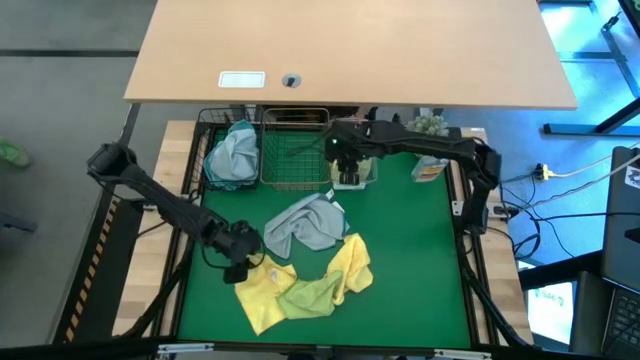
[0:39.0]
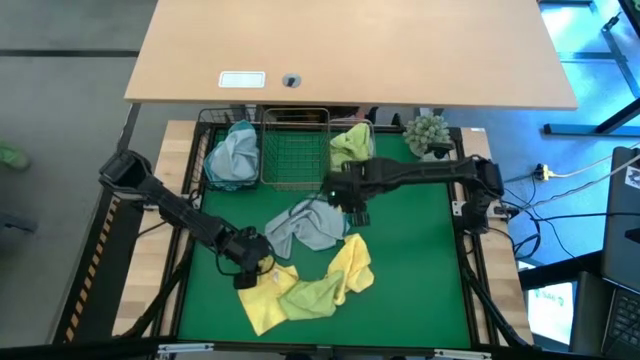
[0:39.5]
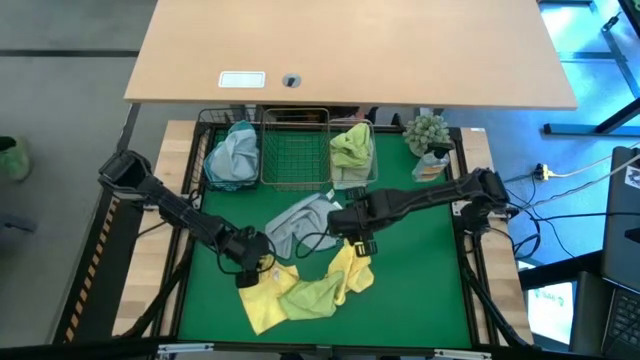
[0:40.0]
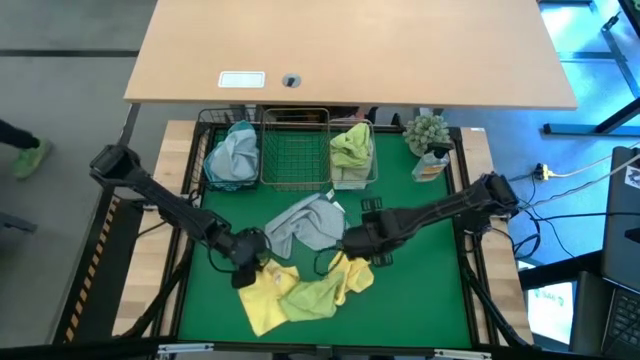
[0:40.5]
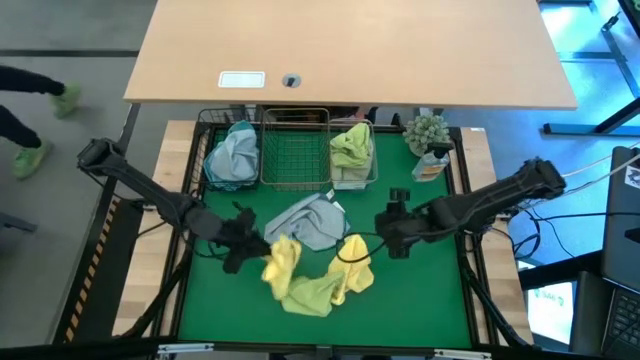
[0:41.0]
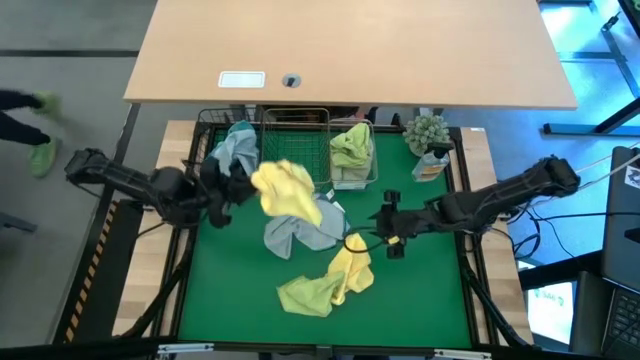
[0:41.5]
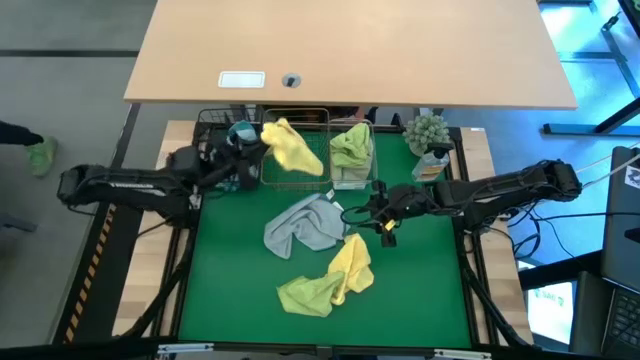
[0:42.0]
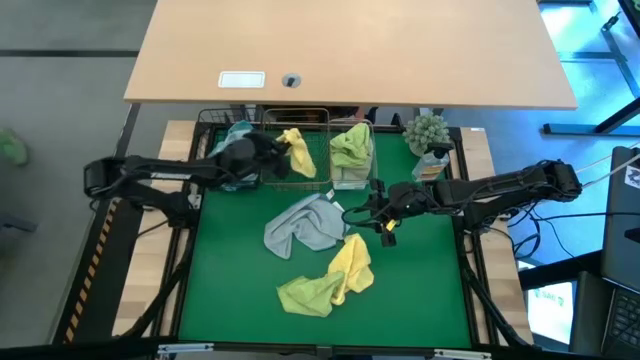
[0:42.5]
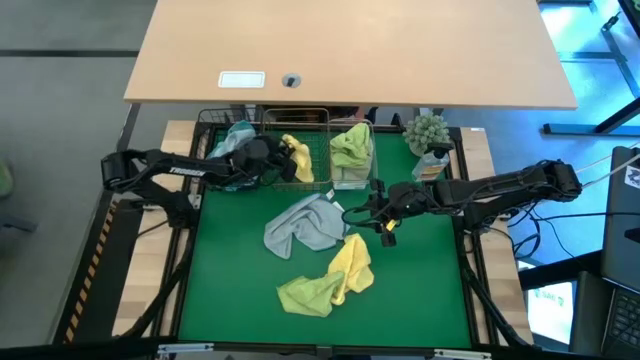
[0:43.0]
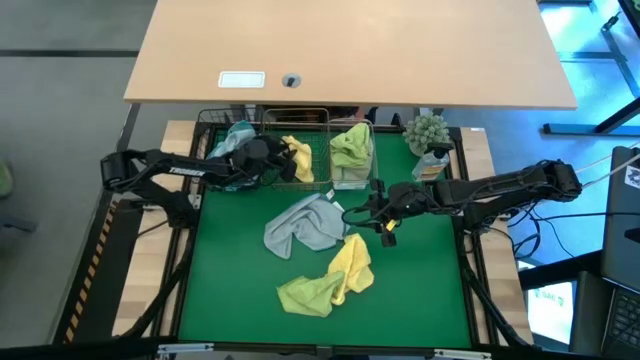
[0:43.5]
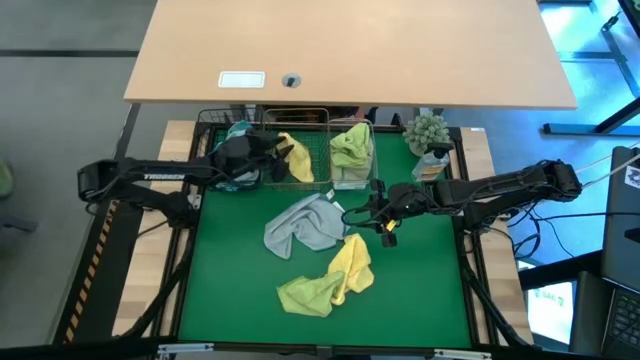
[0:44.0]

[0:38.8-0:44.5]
Task: Sort microfiber towel by color & place in baskets
Put the yellow microfiber cloth into the gold wire basket

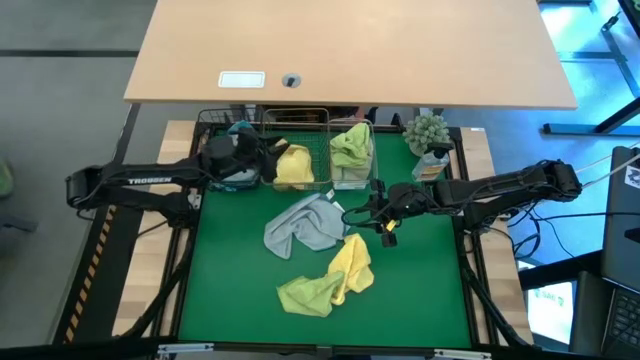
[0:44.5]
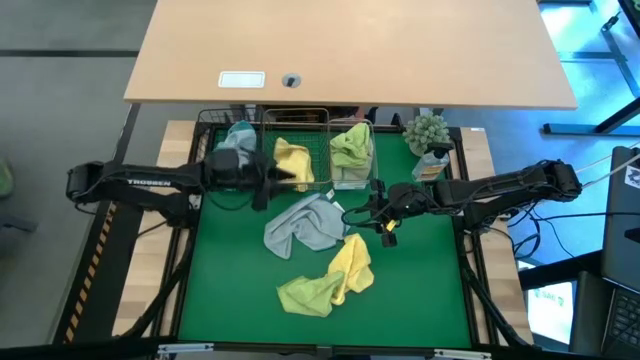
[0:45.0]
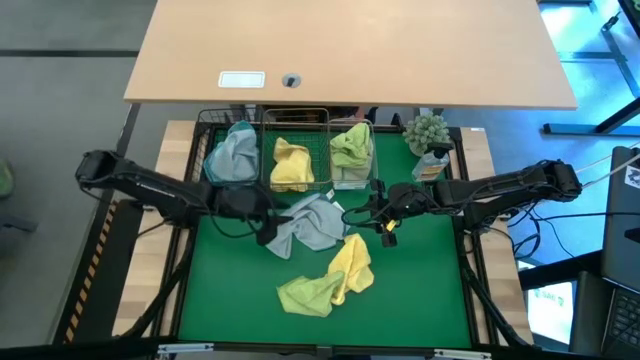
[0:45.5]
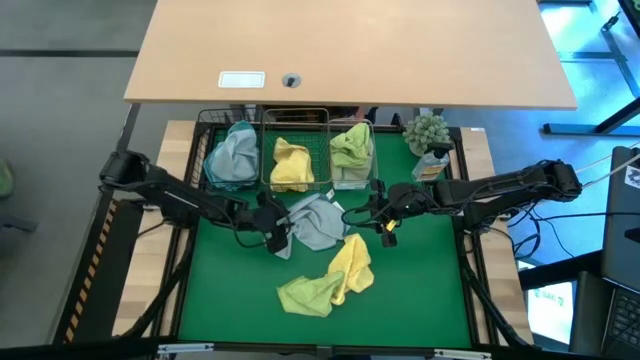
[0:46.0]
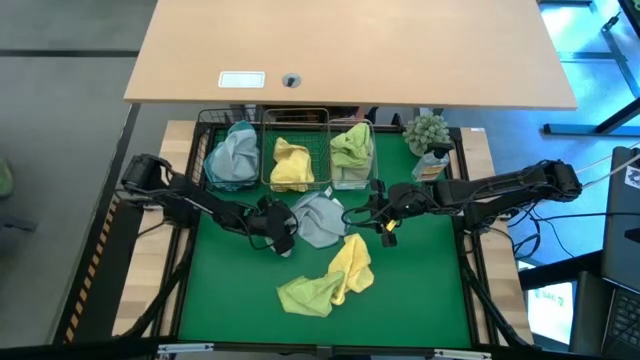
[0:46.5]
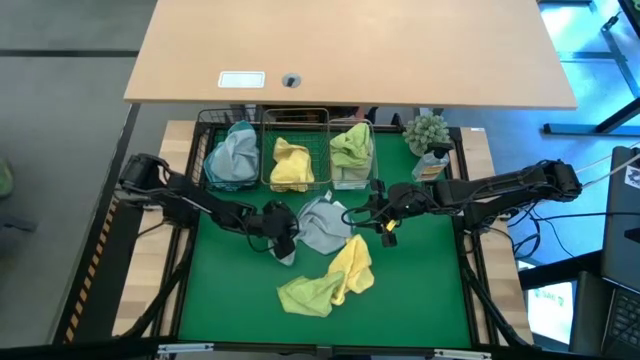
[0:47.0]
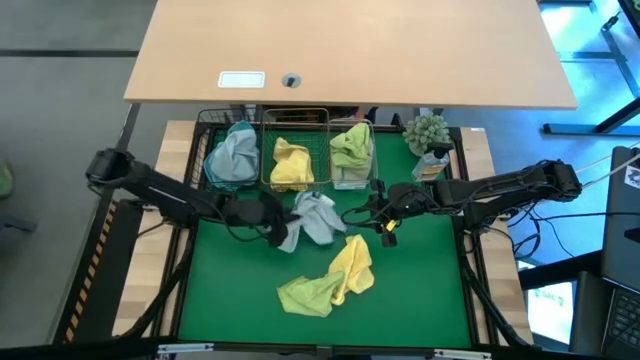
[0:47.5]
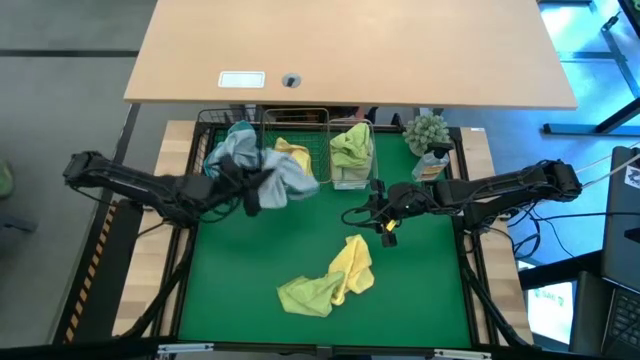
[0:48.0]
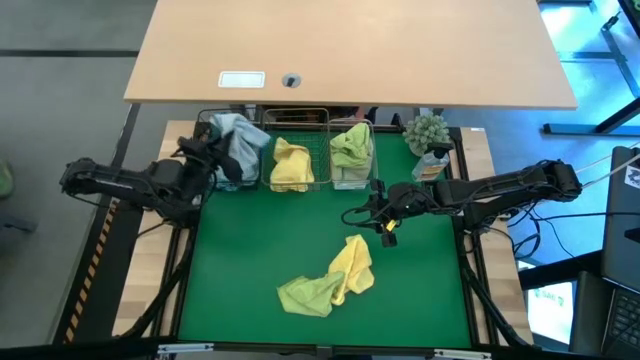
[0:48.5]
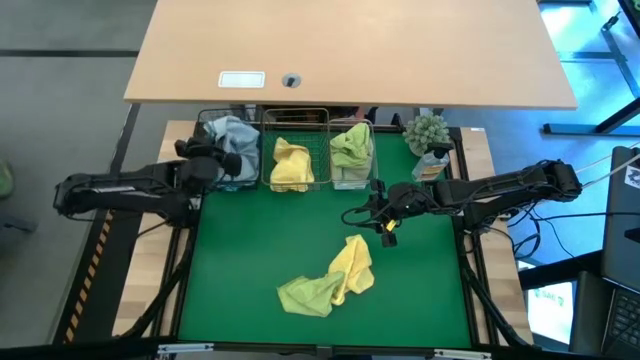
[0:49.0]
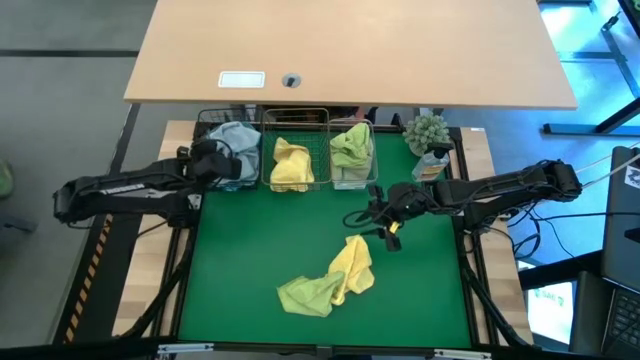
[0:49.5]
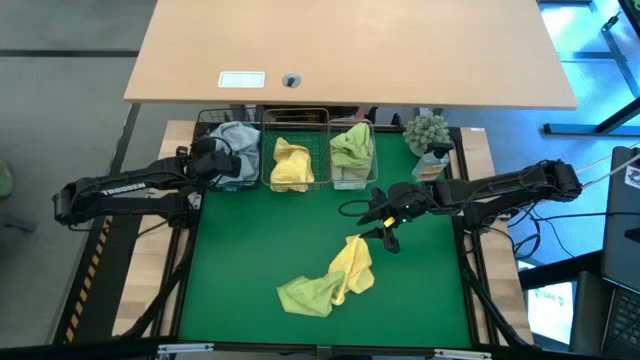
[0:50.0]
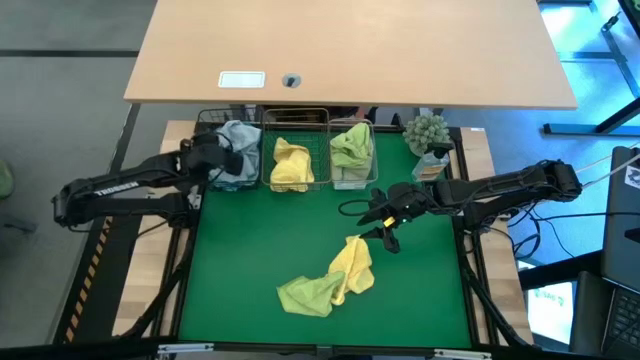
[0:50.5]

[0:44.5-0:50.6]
Put the light blue microfiber cloth into the black wire basket

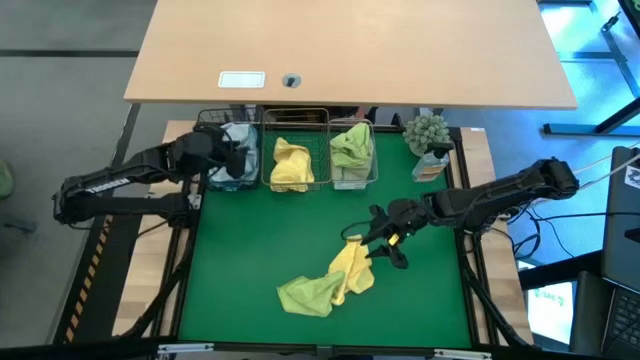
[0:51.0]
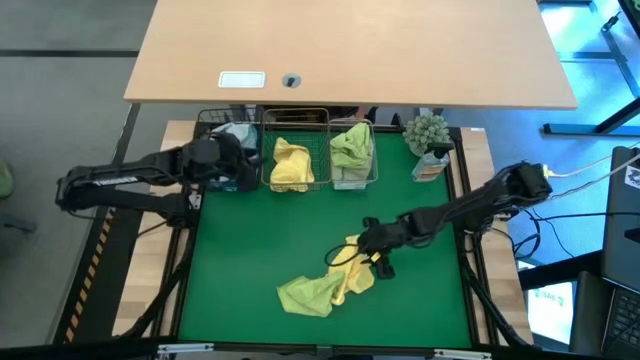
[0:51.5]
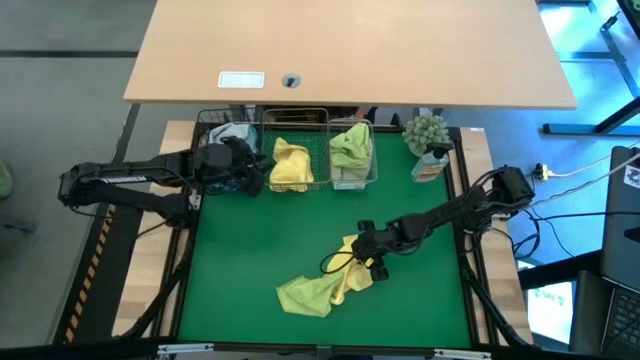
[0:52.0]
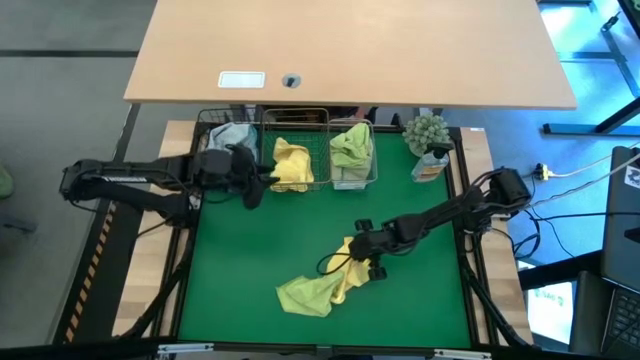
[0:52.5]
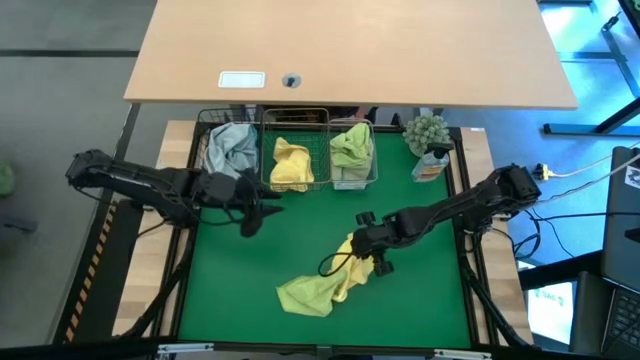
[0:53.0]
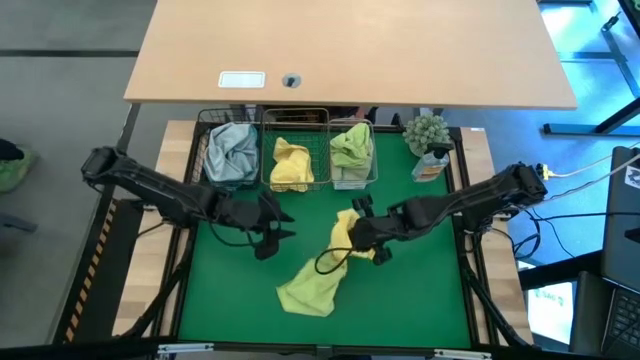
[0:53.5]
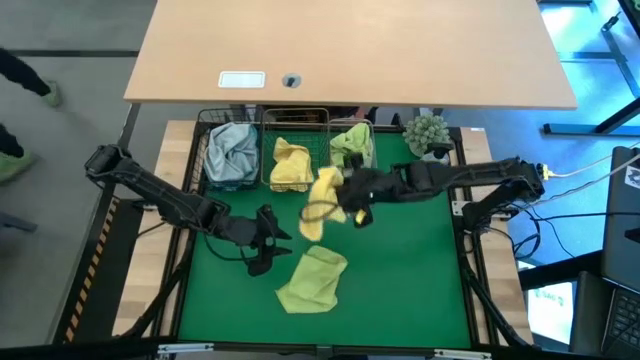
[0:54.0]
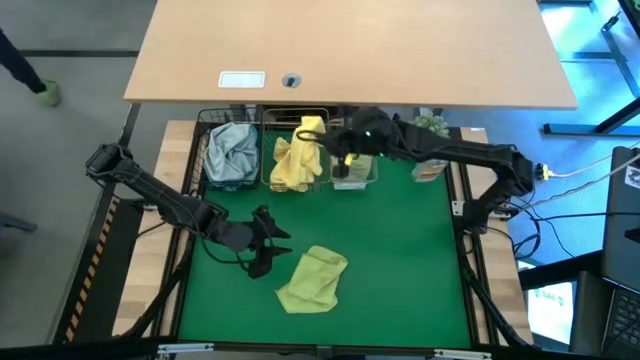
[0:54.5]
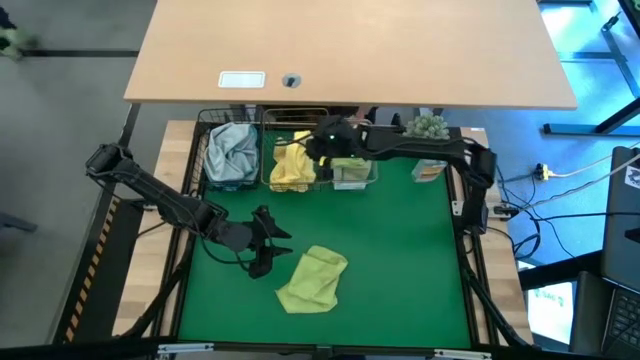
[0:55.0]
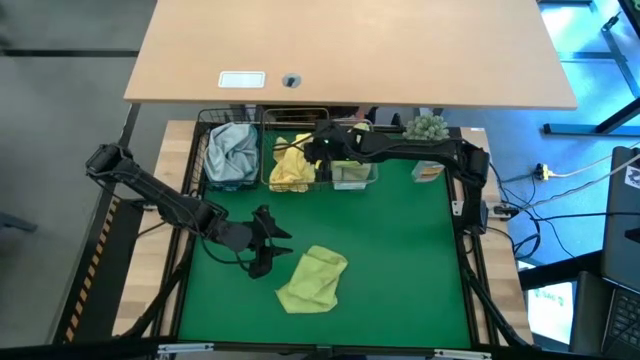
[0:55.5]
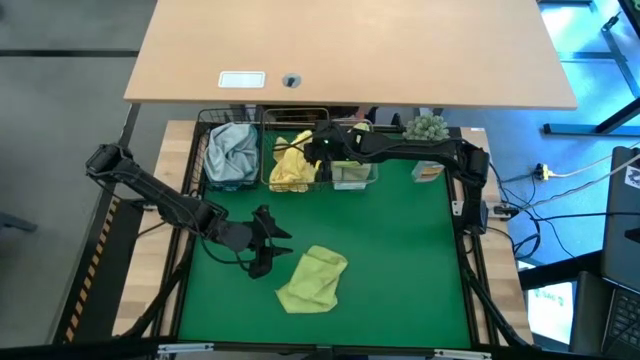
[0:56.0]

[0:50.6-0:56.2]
Put the yellow microfiber cloth into the gold wire basket

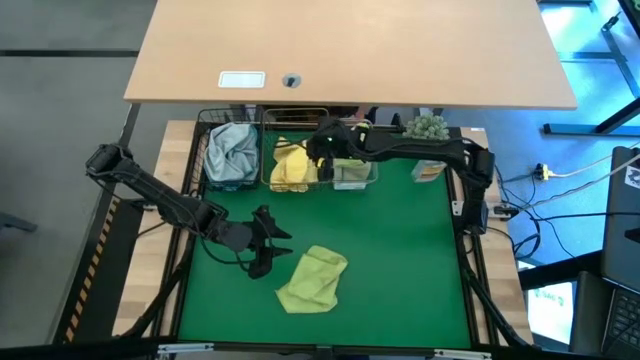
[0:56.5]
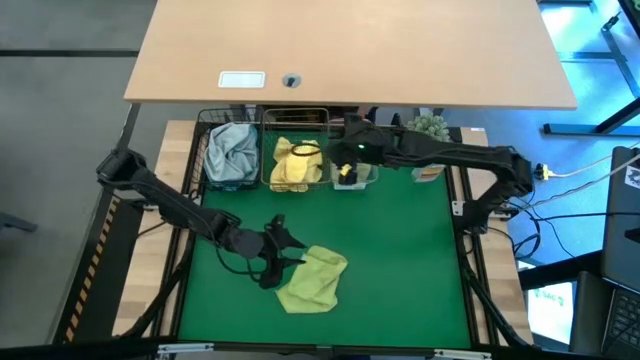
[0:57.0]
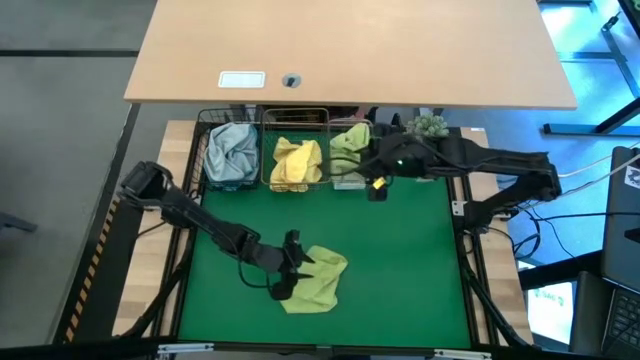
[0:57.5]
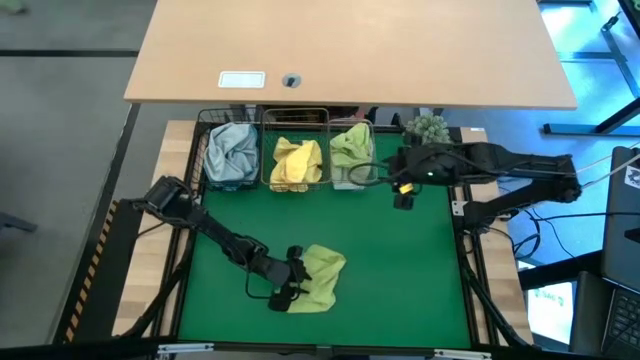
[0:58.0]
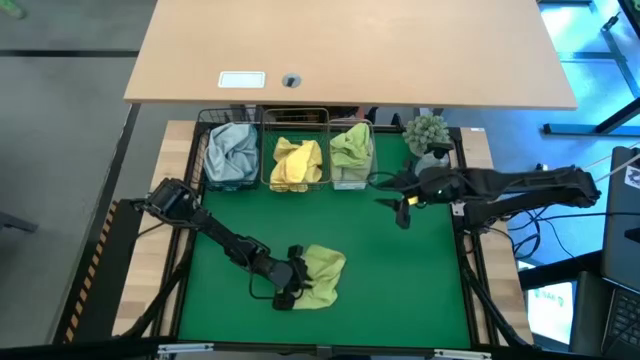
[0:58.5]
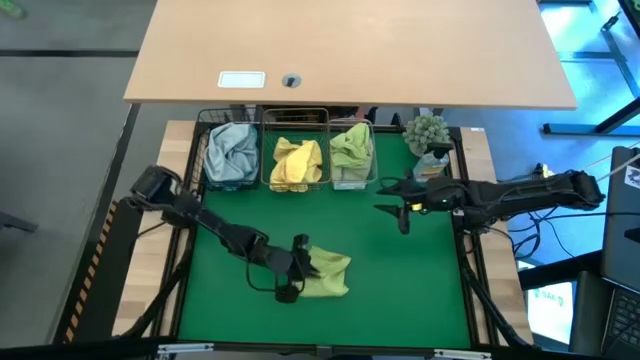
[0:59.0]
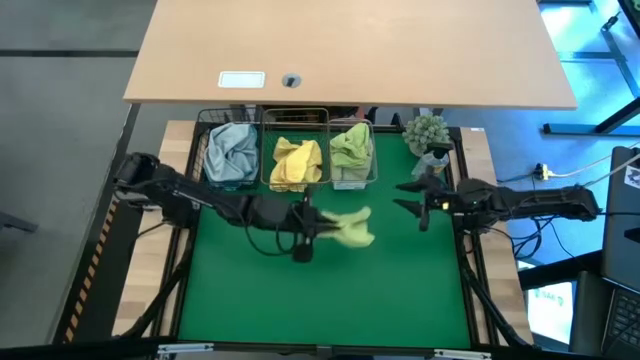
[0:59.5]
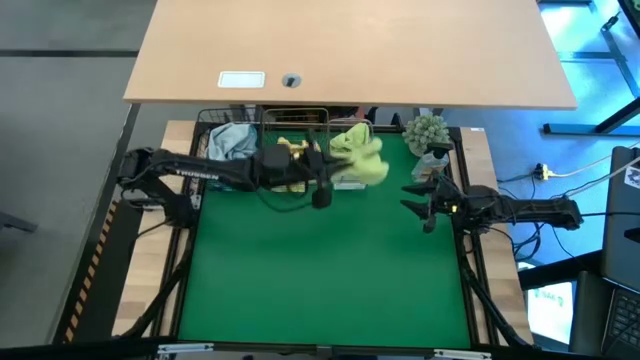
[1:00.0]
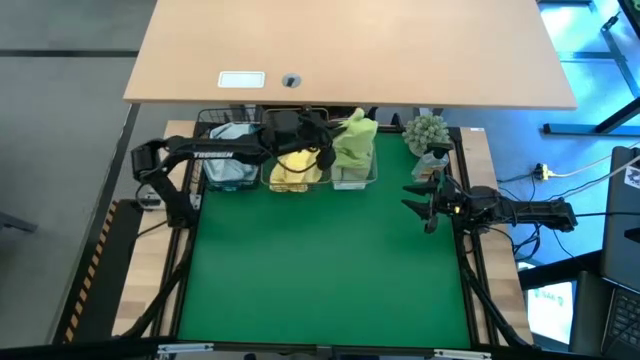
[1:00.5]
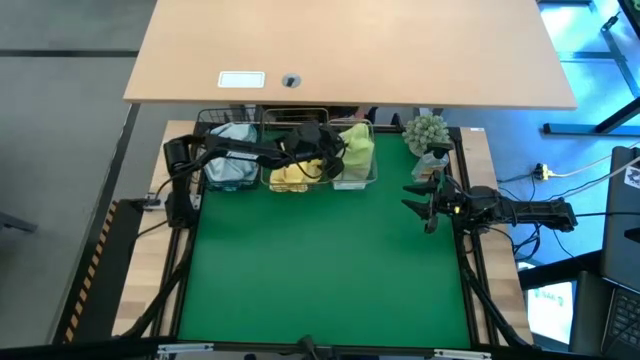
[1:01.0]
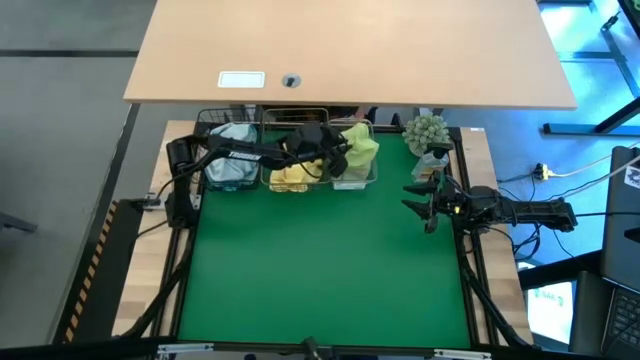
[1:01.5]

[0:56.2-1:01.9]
Put the green microfiber cloth into the transparent bin
